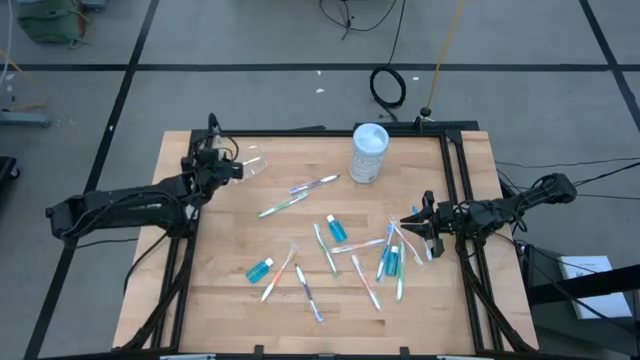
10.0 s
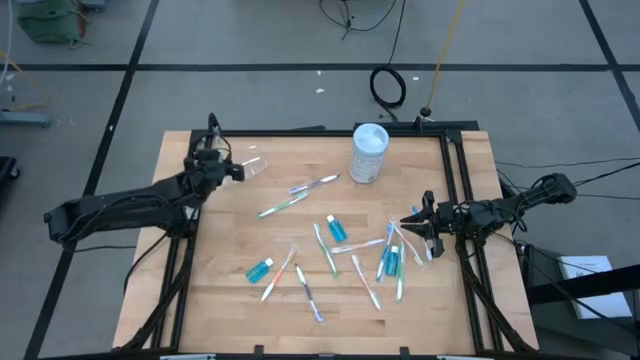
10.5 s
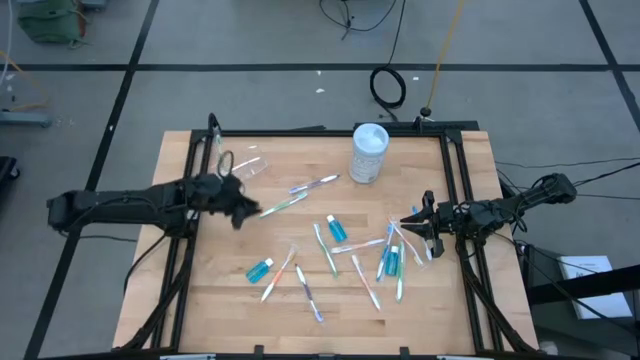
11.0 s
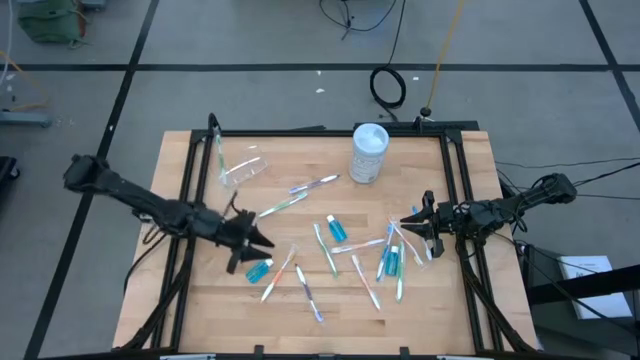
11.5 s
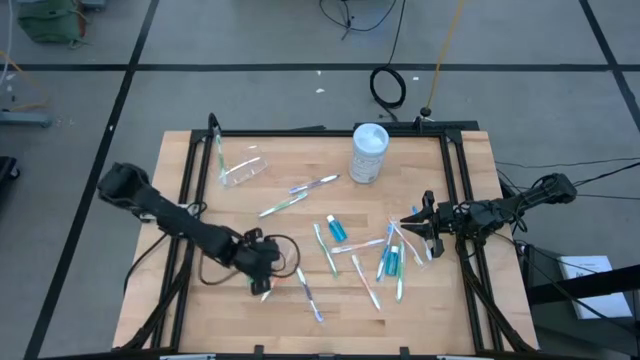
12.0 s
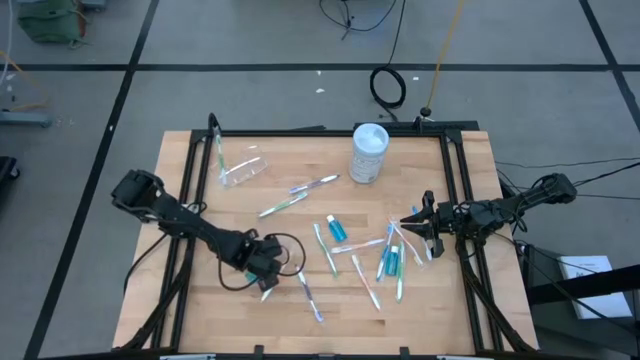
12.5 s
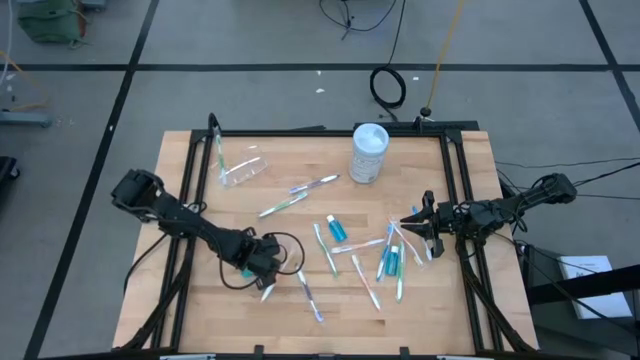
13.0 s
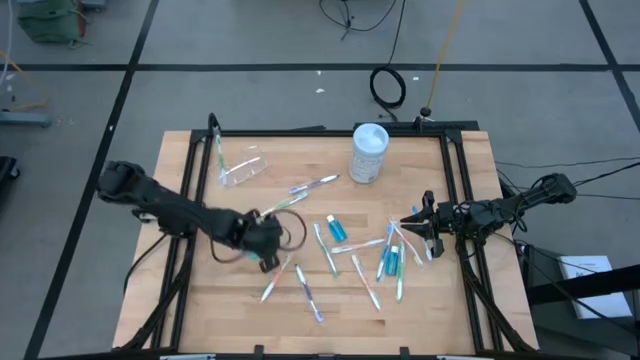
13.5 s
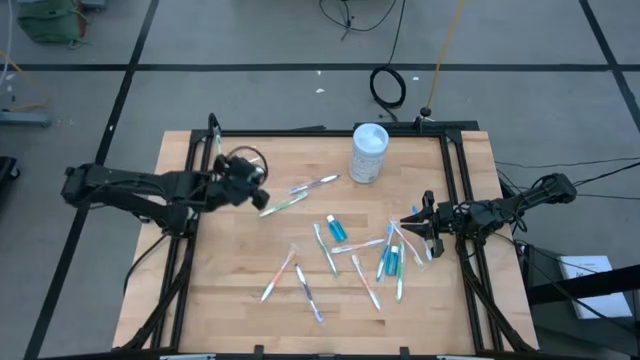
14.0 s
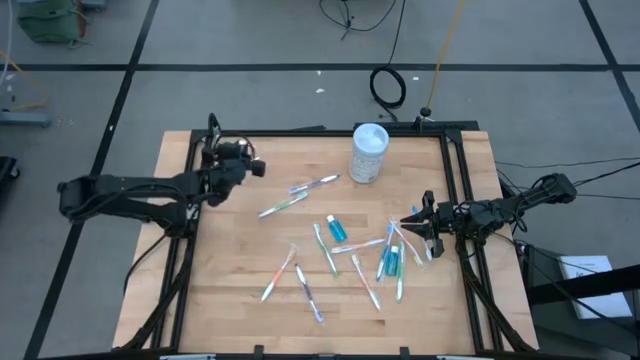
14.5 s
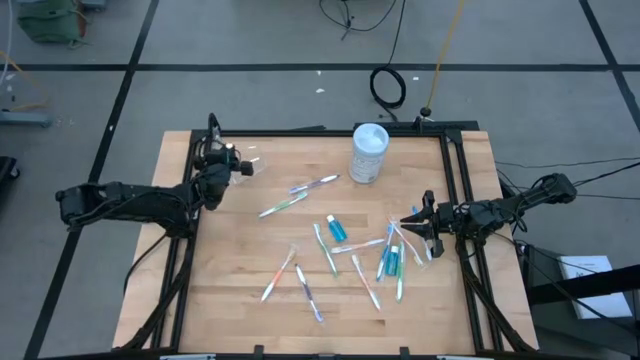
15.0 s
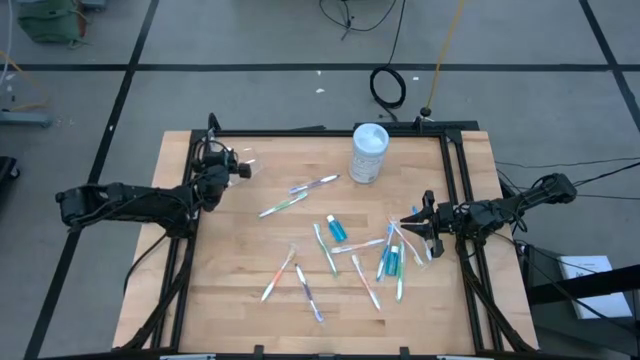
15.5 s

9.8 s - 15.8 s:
Task: Pick & Place toothbrushing station
Put the mouthwash into the transparent organizer

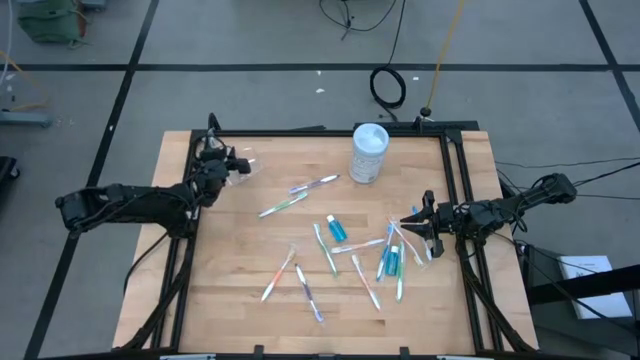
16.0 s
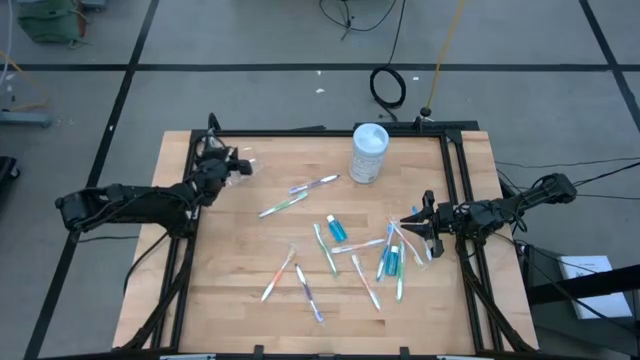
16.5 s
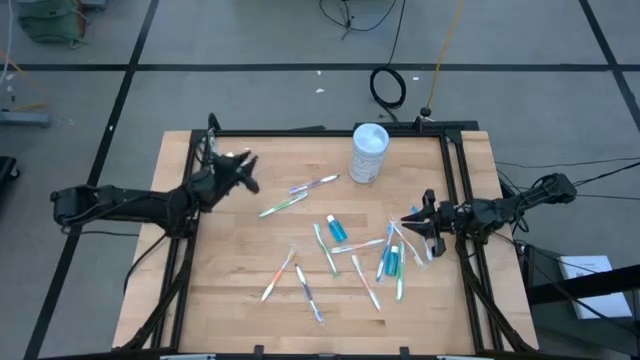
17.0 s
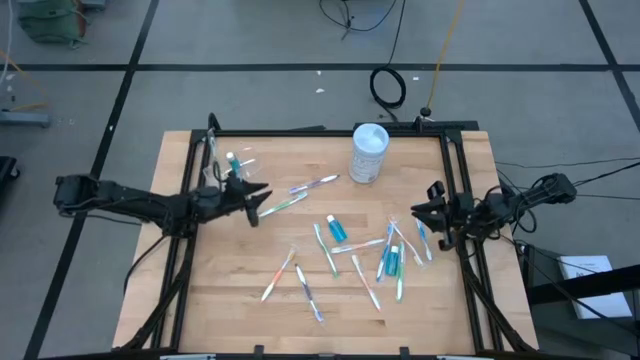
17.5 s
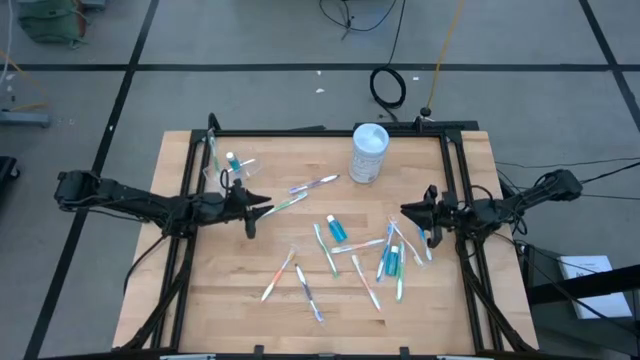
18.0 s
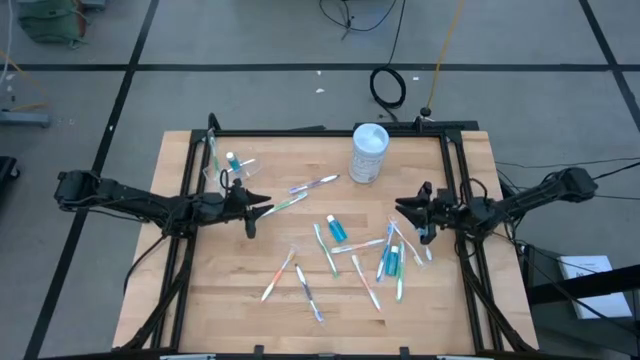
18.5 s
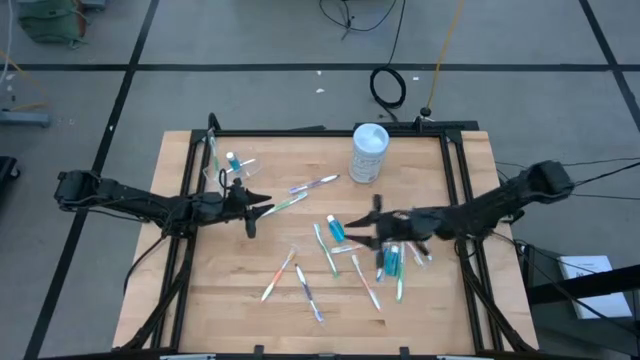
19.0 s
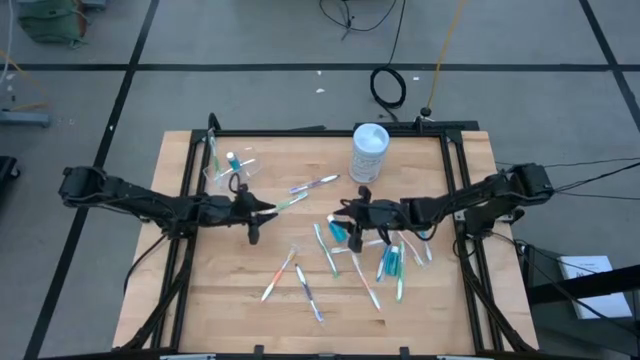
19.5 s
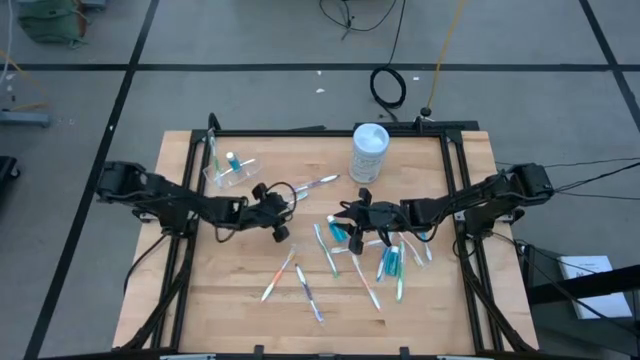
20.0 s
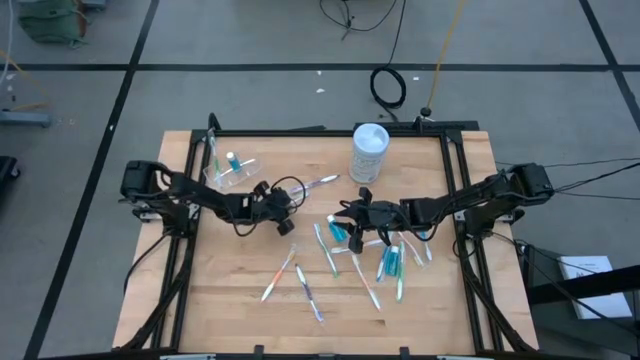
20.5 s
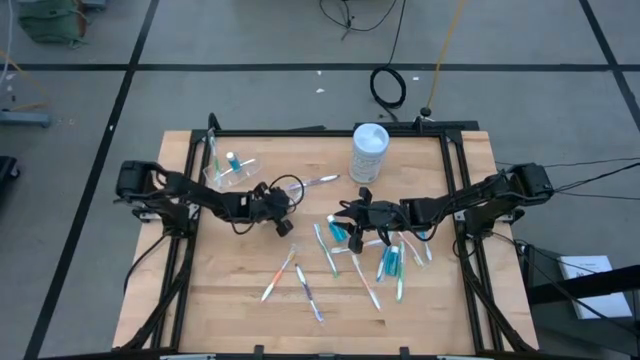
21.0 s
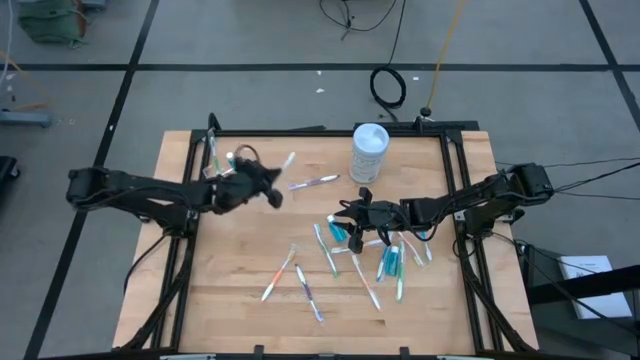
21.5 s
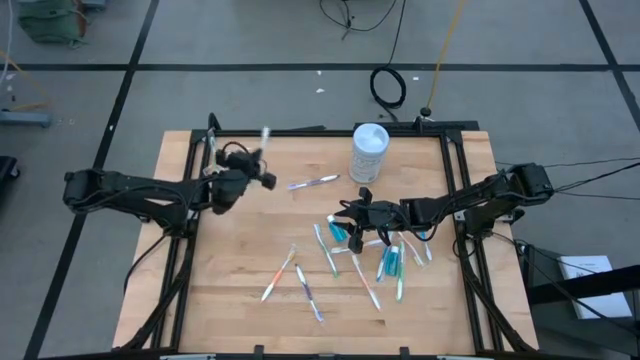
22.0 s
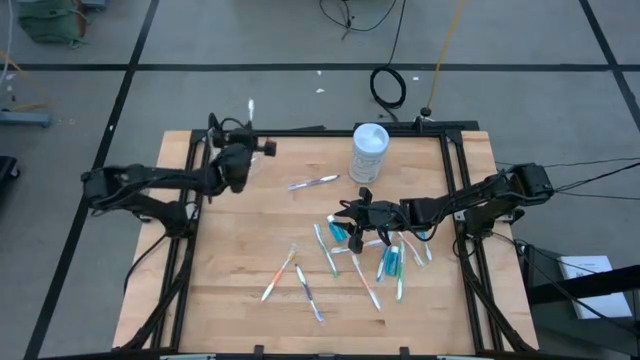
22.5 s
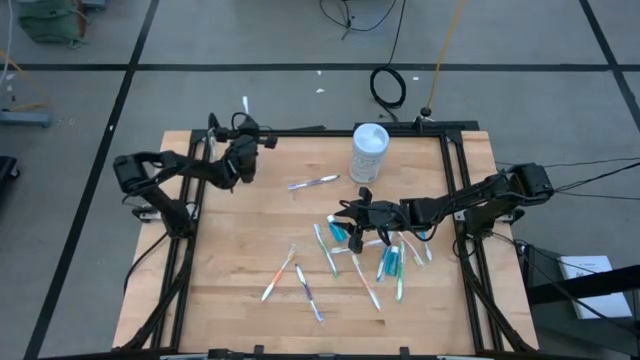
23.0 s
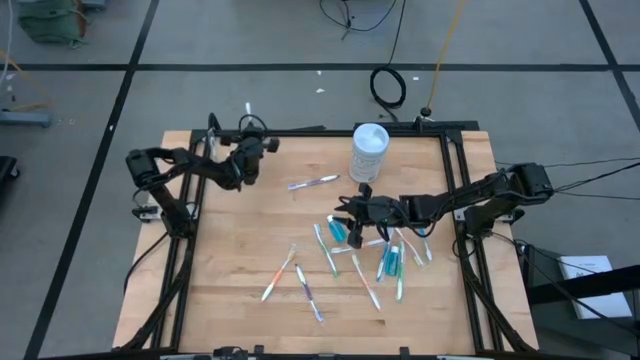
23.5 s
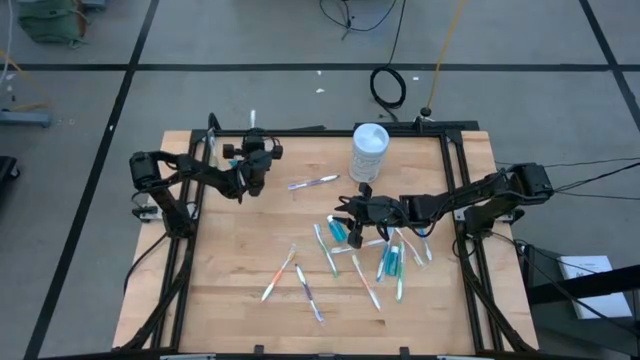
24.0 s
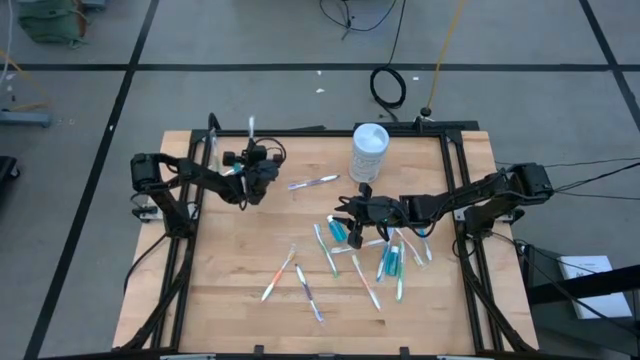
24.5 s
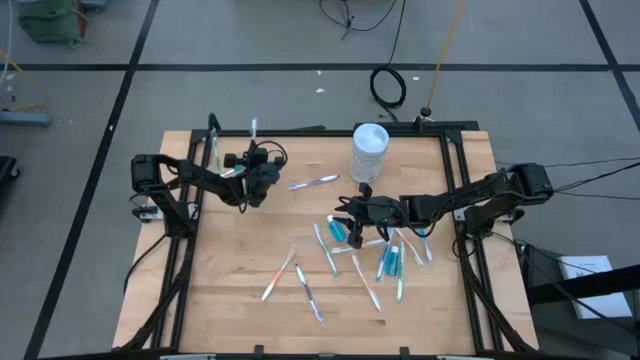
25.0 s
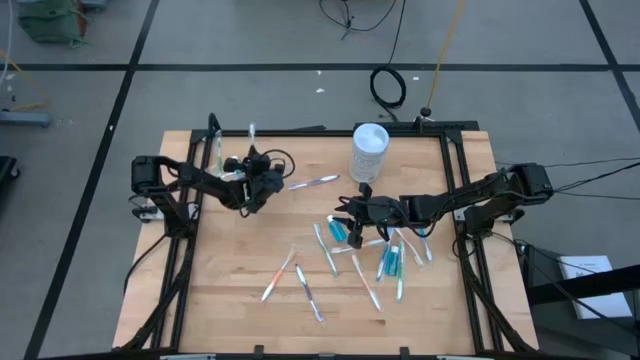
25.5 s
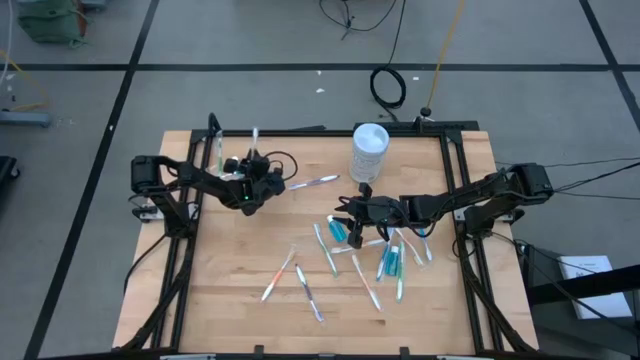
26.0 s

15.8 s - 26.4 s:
Put the green toothbrush into the transparent organizer

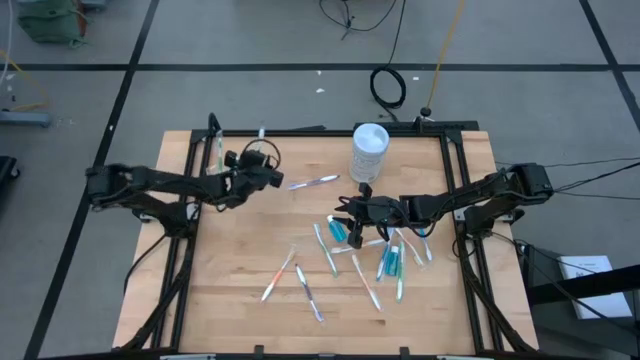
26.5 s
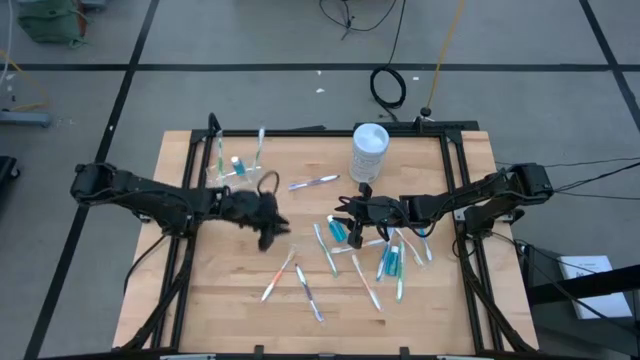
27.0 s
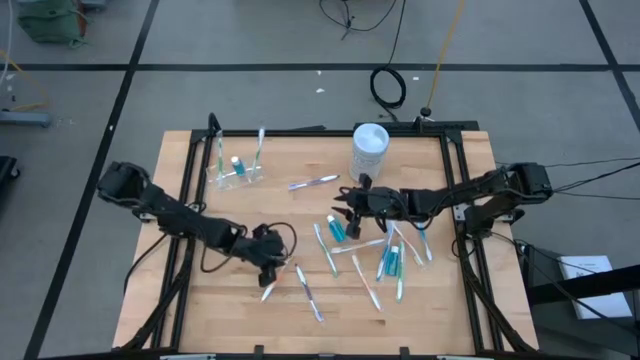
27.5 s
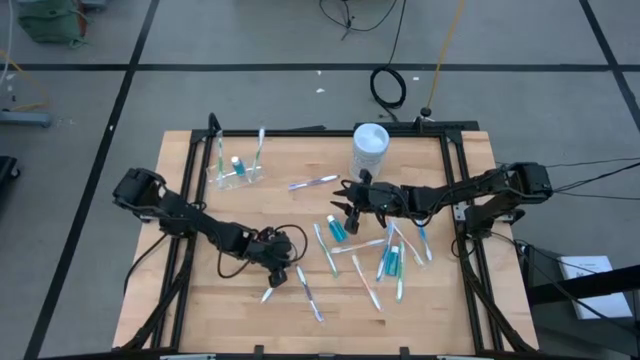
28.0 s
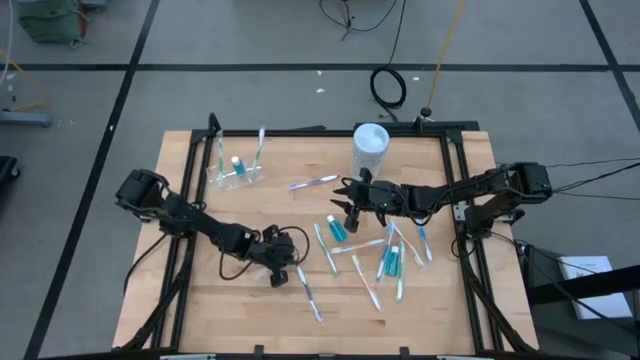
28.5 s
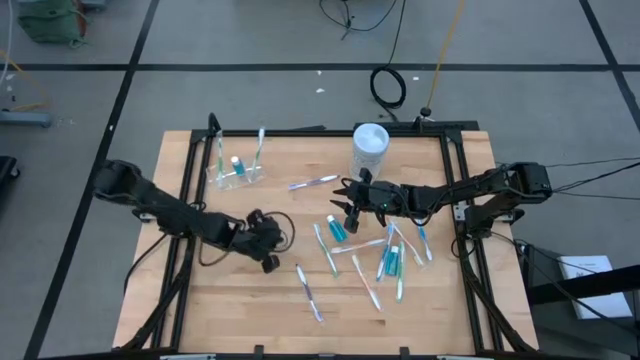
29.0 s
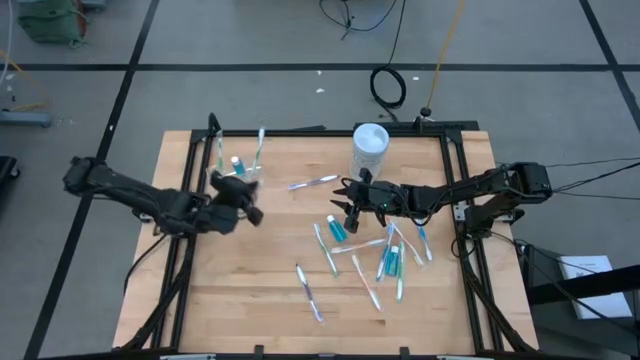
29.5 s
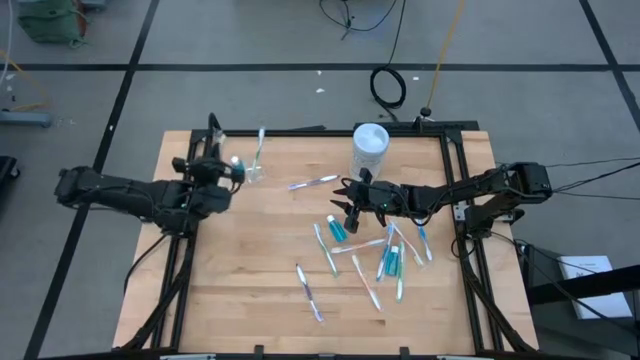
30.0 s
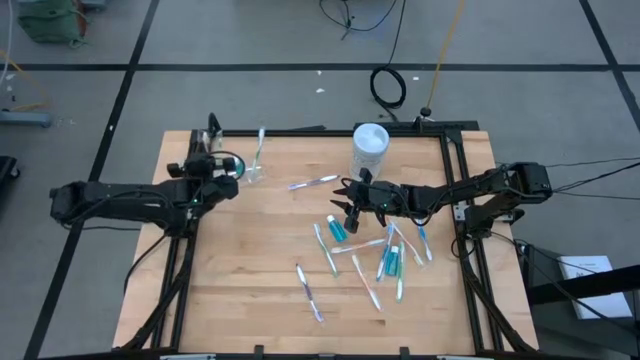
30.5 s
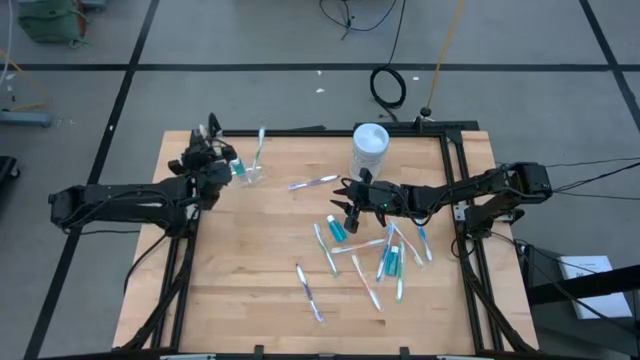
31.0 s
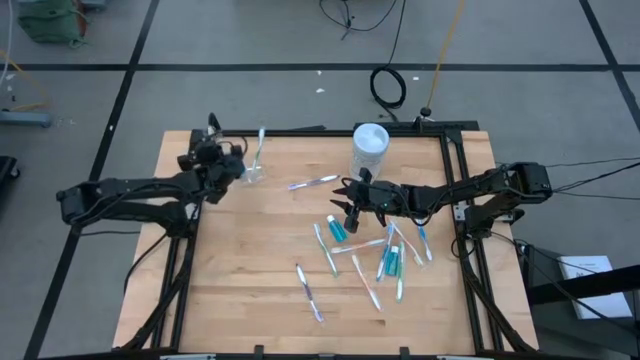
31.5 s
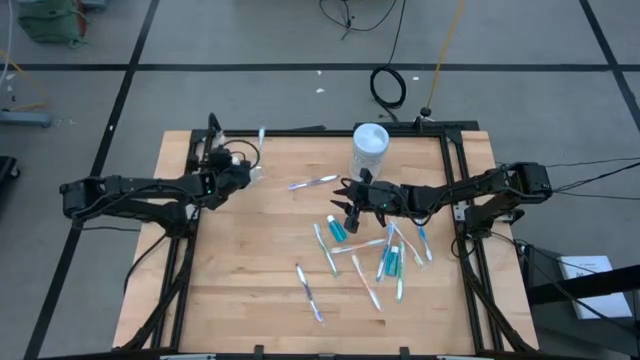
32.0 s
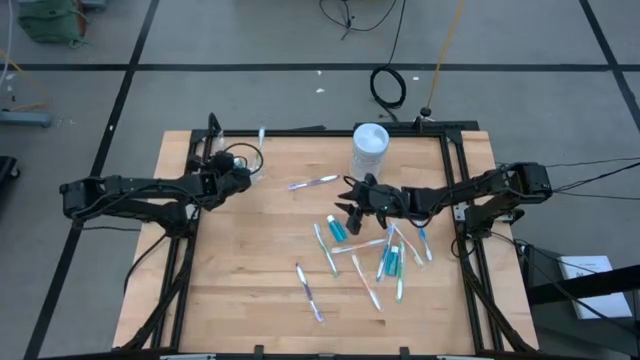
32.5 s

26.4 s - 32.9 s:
Put the orange toothbrush into the transparent organizer
